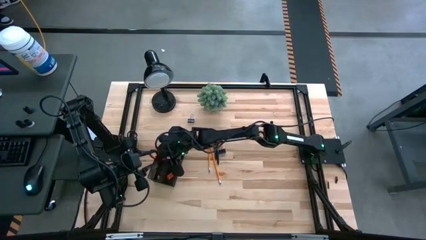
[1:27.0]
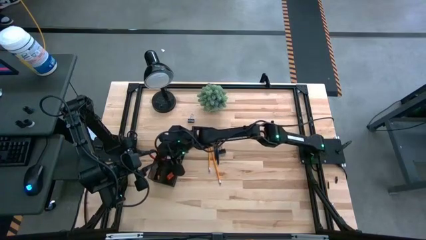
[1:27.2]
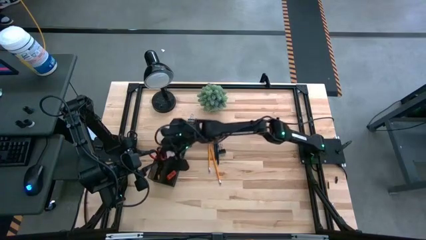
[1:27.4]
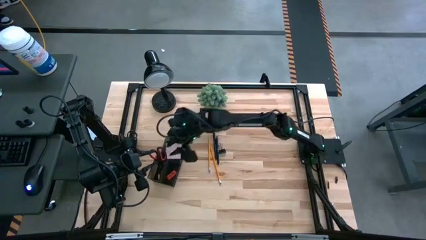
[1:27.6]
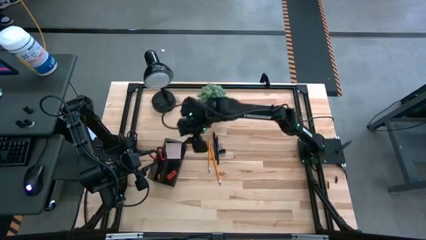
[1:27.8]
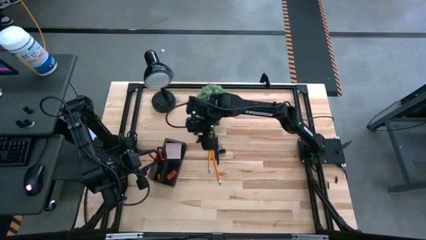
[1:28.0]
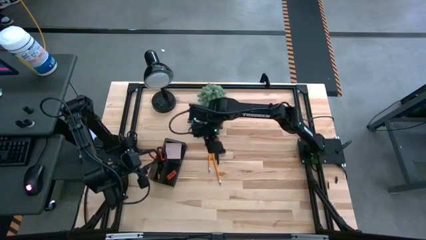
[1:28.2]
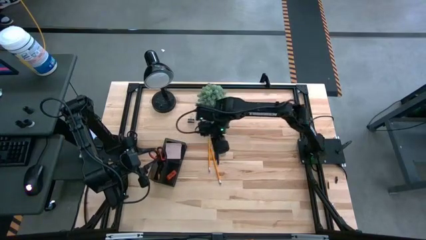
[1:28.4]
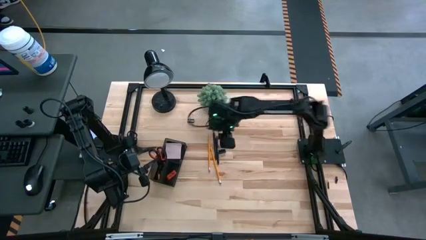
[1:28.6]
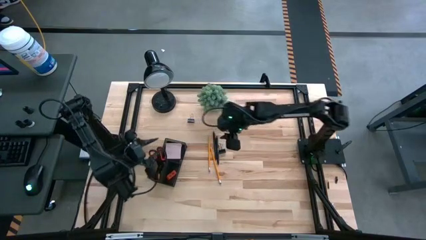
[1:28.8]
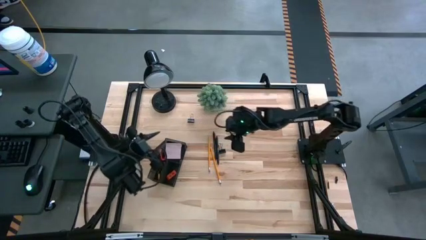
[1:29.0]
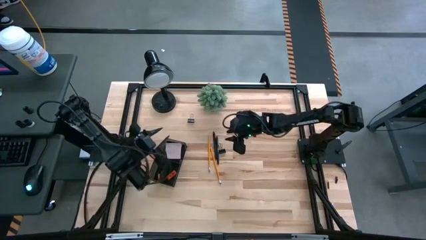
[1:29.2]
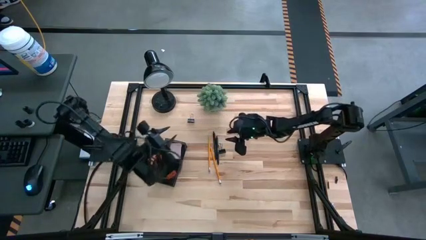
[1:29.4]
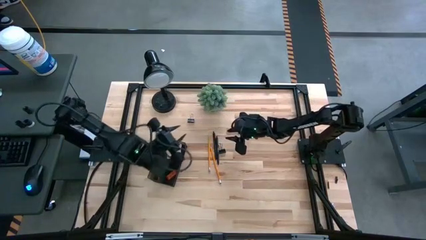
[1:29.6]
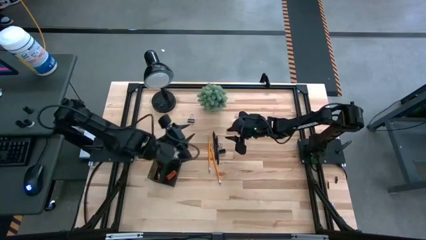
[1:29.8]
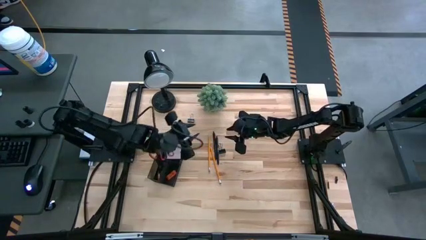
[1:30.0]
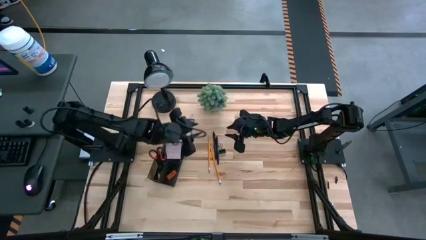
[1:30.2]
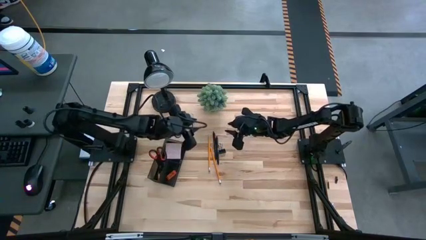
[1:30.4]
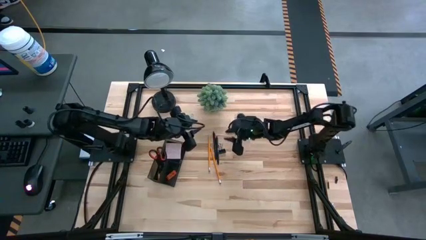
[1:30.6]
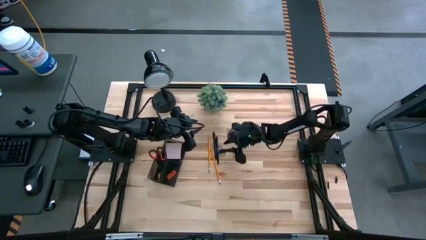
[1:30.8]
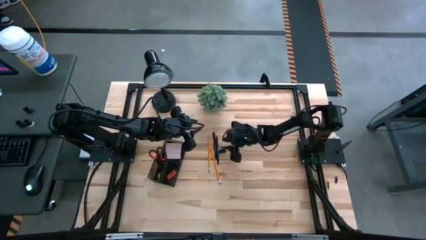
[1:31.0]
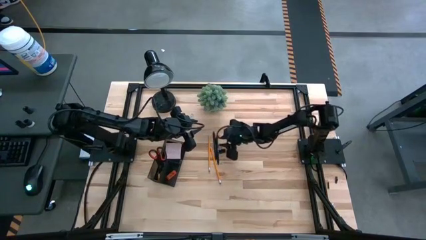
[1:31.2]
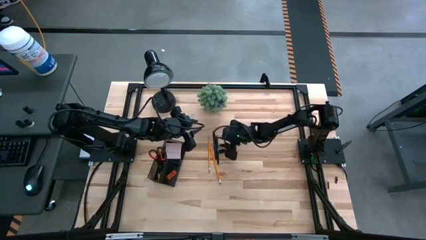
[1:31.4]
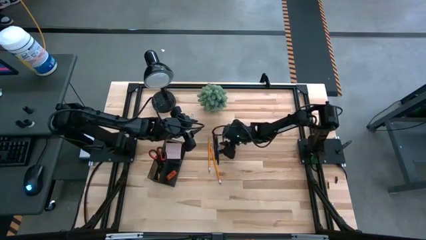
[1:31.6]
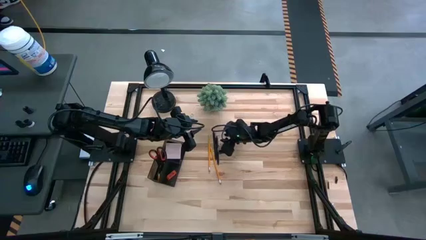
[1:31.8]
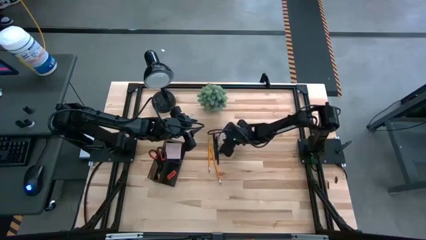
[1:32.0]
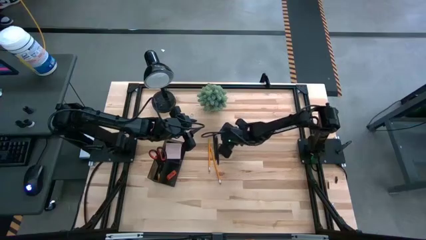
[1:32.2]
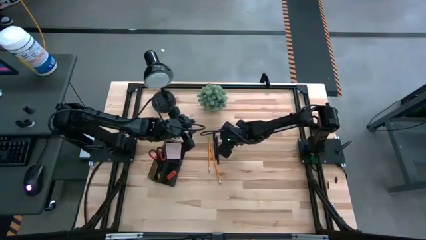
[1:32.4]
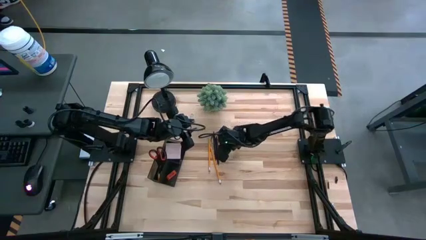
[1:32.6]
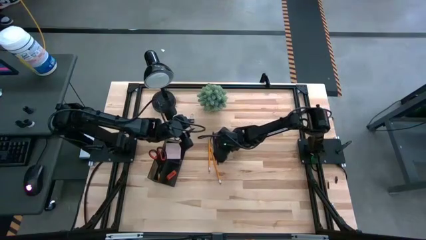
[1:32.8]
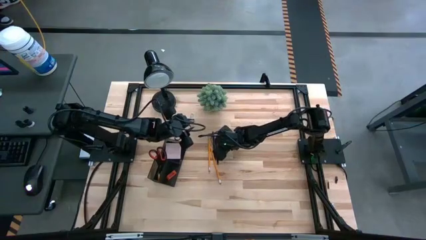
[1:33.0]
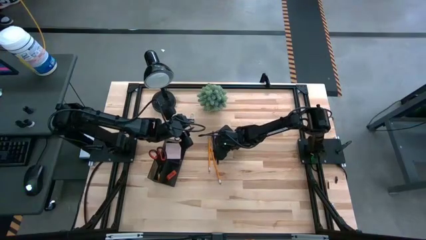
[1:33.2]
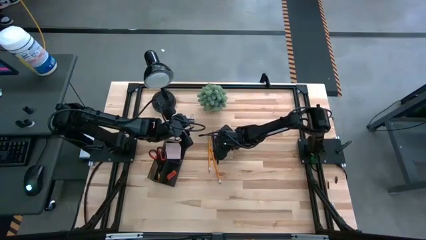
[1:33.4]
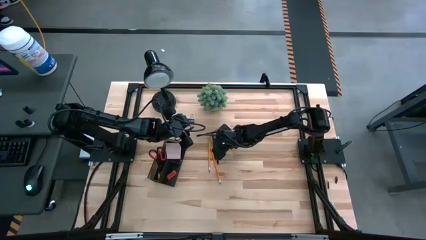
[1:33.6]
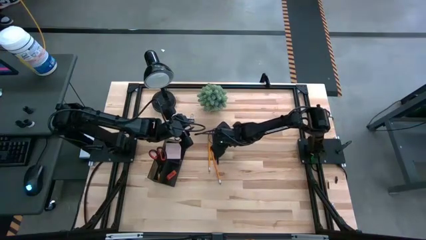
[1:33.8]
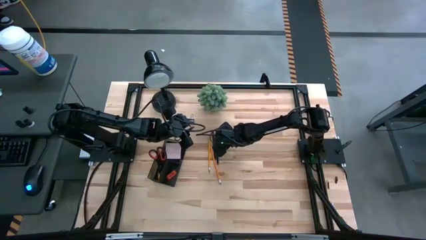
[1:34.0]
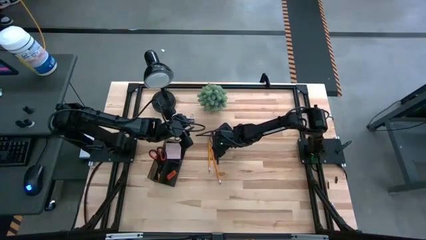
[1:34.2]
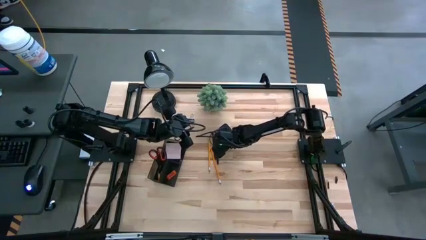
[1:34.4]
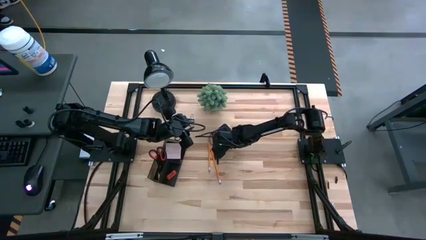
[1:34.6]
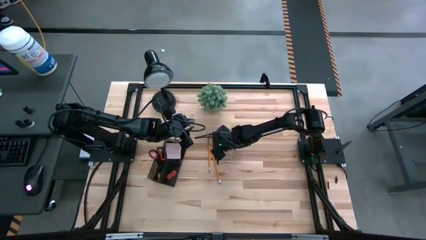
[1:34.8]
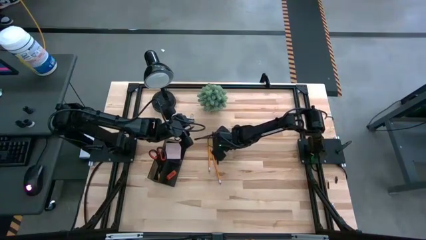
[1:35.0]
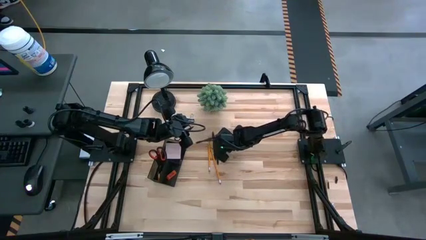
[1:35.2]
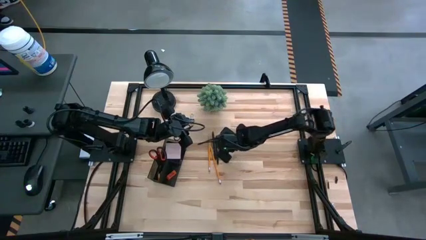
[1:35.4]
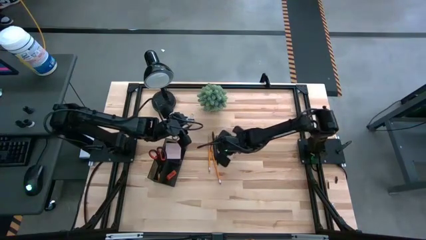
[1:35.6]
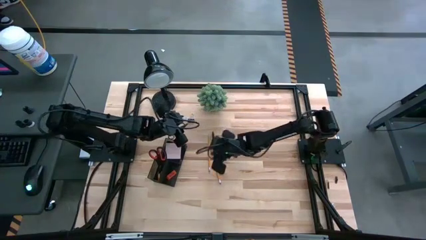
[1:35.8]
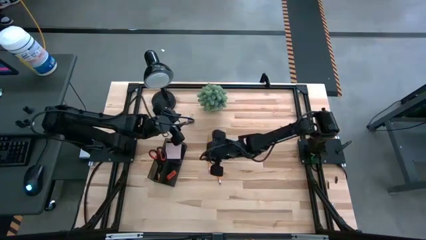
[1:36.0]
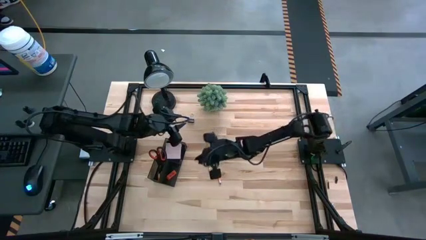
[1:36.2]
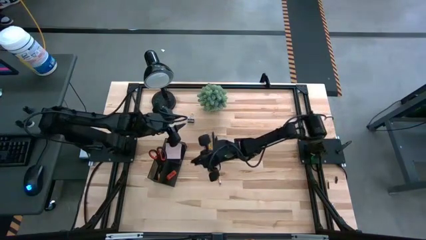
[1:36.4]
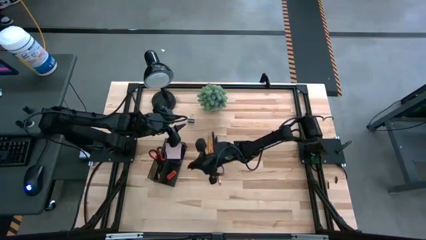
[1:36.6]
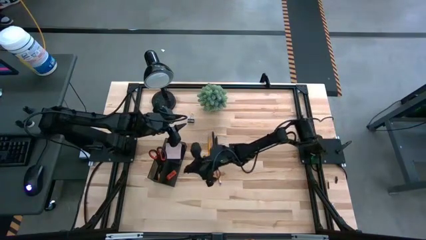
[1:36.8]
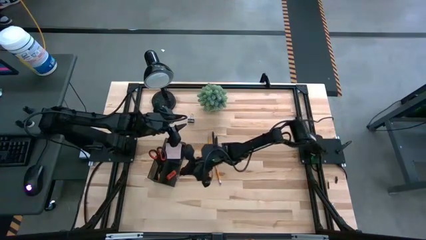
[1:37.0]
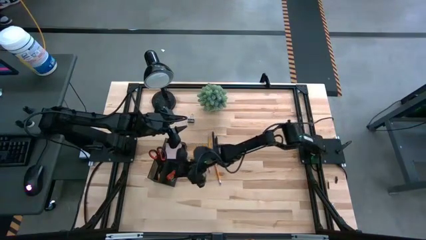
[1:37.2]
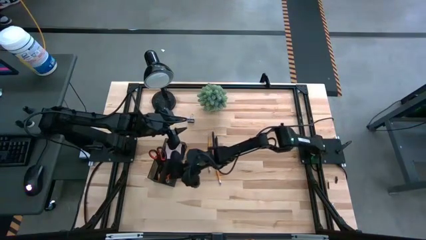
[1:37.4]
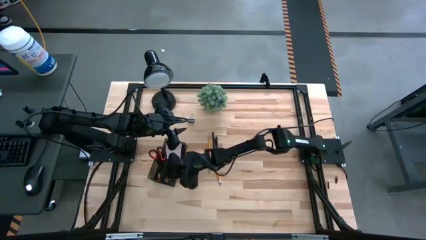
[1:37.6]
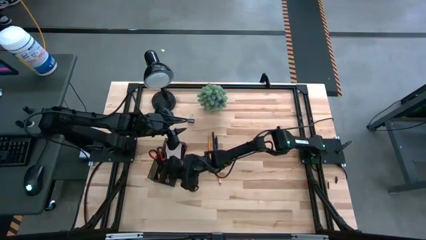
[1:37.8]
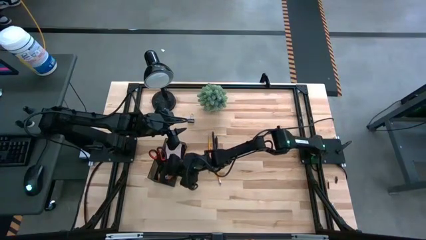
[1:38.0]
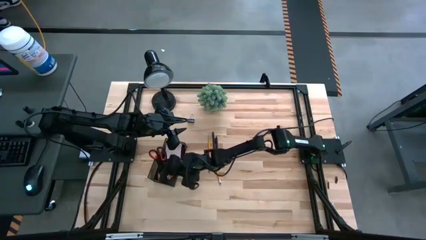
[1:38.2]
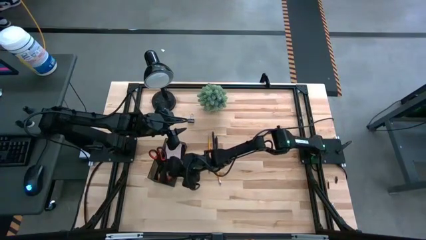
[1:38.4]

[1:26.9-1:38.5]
Task: Pick and place office supplies into organizer
Put the bottom black binder clip into the desk organizer
